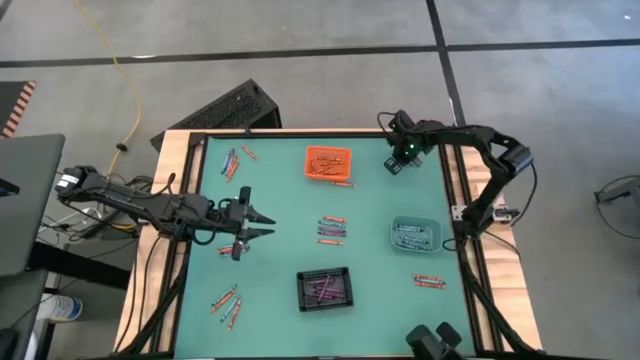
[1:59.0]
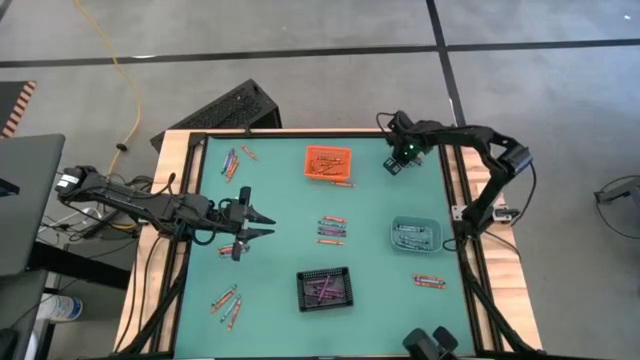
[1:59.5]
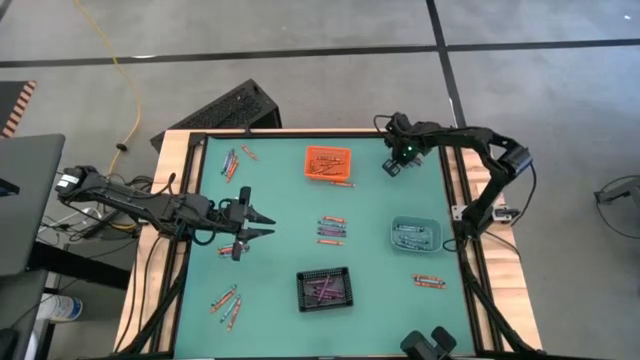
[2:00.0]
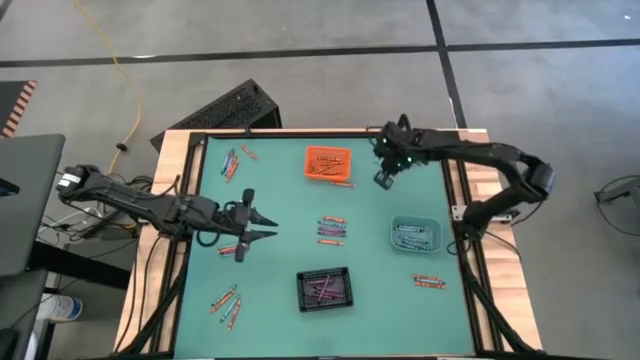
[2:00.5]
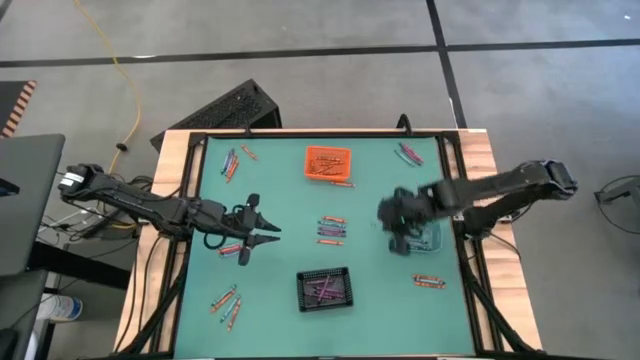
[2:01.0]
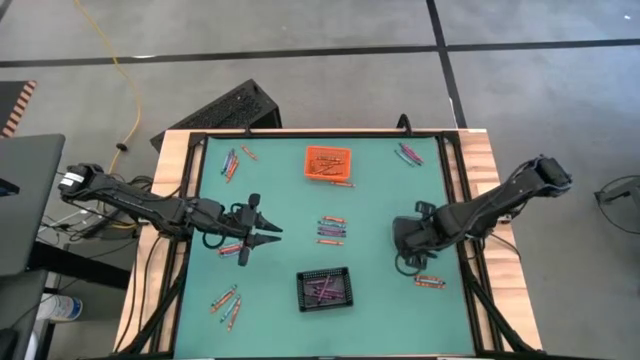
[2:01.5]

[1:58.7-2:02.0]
Task: Sort crayons
Put the blue crayon into the blue bin

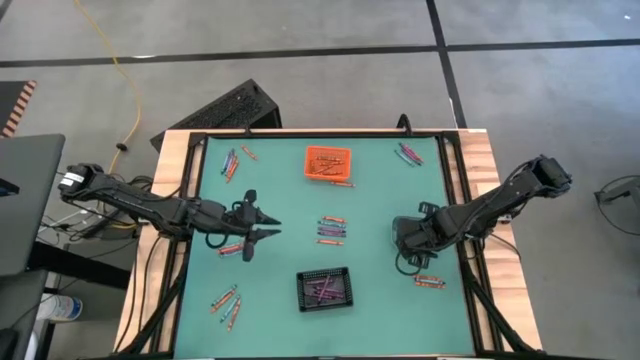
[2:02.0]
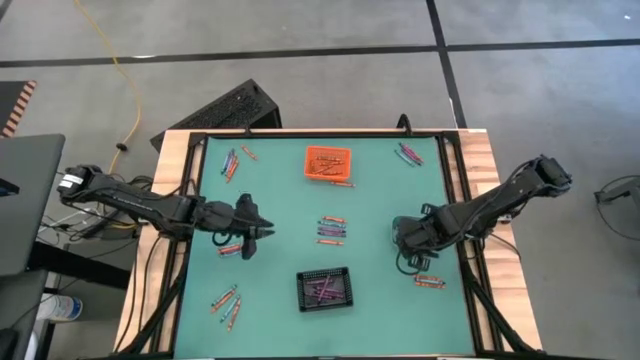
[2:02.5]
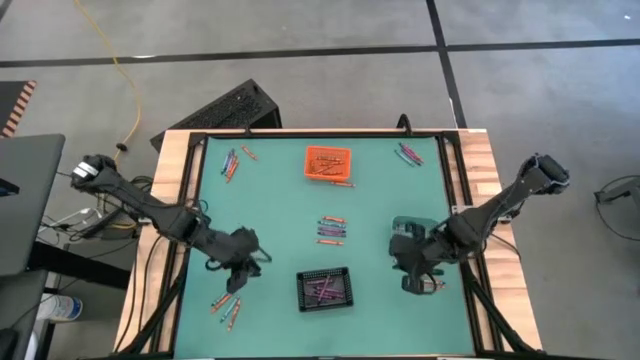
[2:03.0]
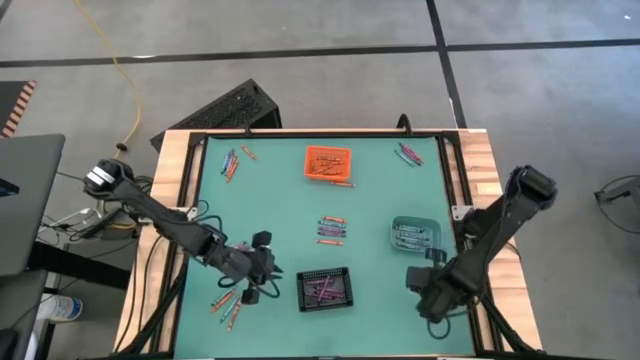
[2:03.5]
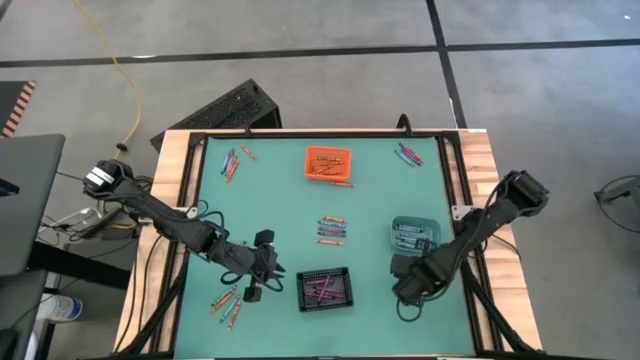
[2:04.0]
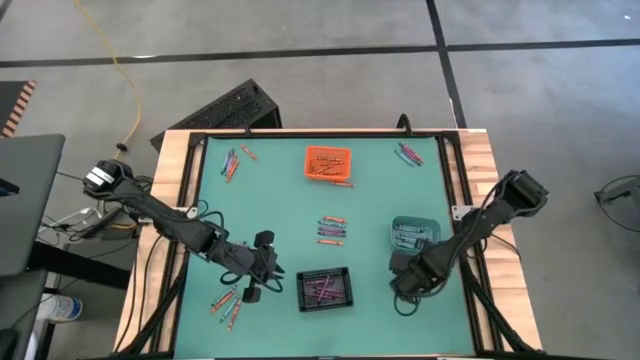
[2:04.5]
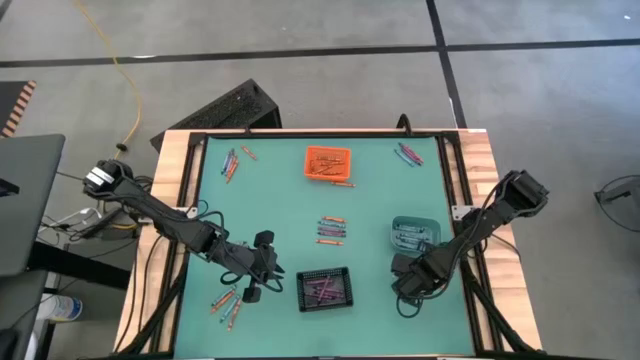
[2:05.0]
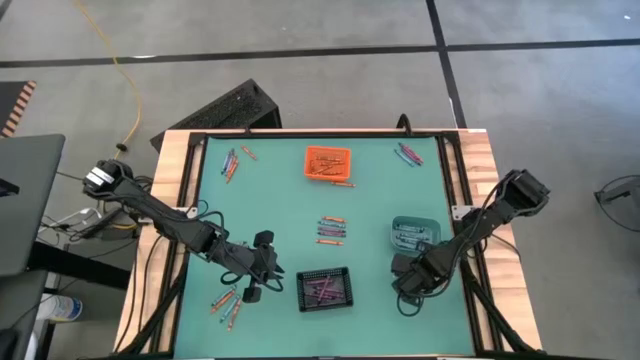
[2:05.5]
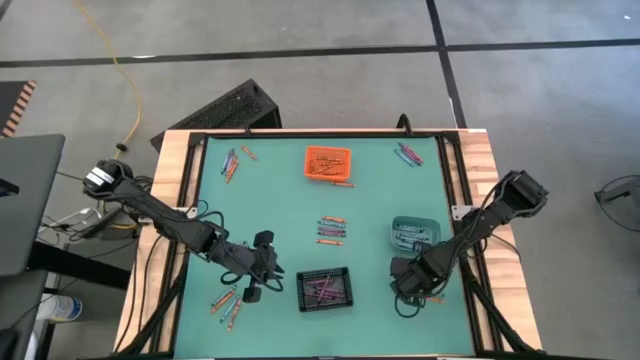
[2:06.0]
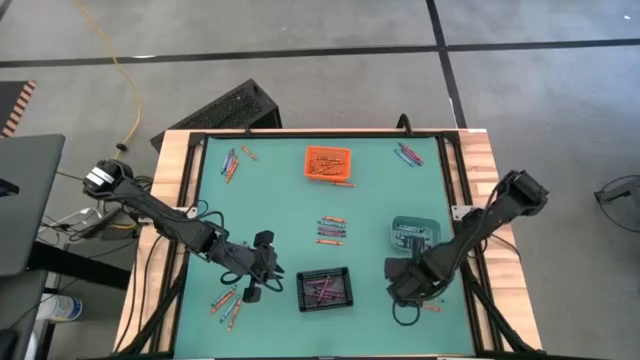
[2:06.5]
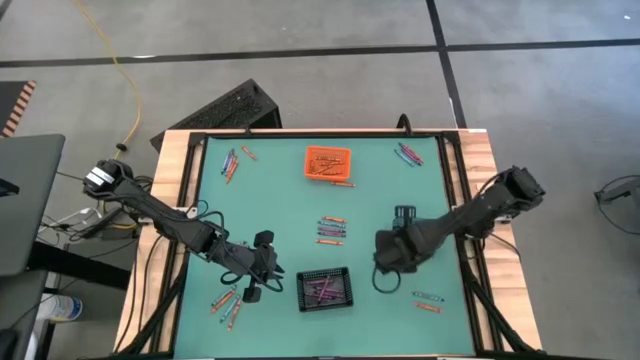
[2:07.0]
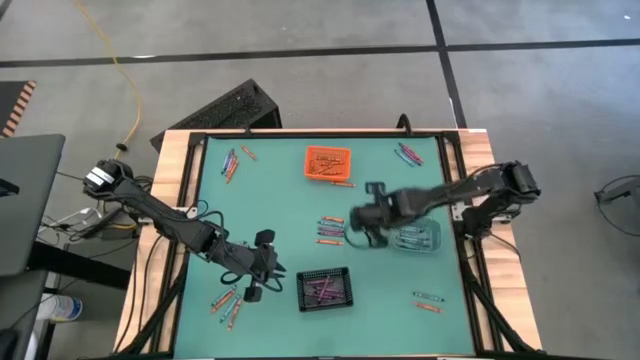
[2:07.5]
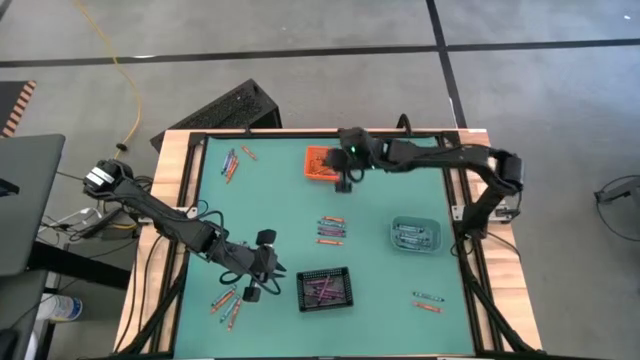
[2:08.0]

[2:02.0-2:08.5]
Put the orange crayon into the orange bin

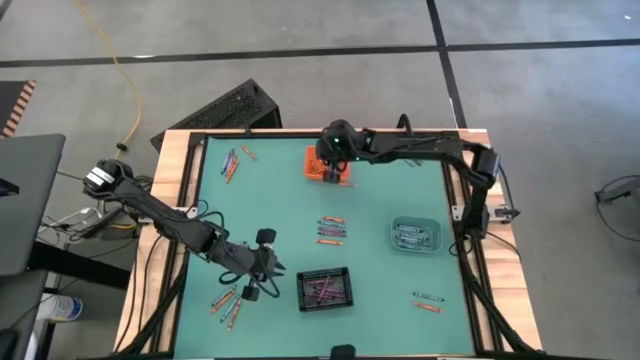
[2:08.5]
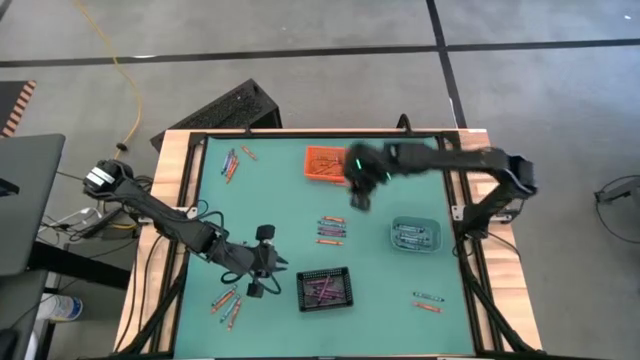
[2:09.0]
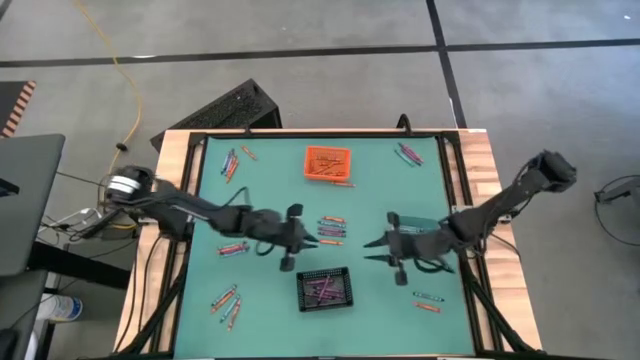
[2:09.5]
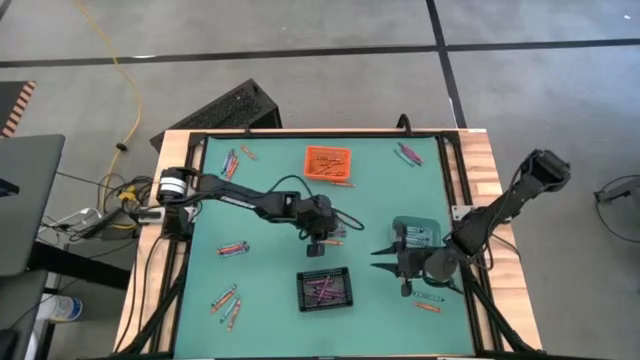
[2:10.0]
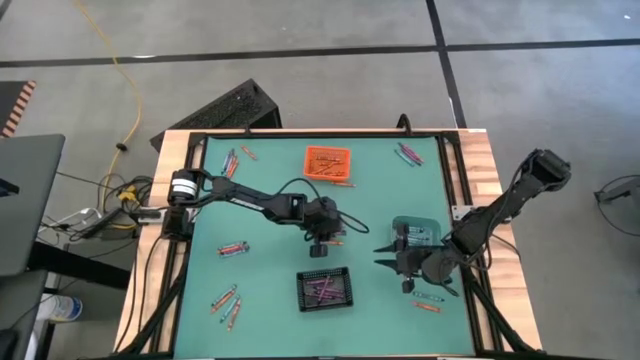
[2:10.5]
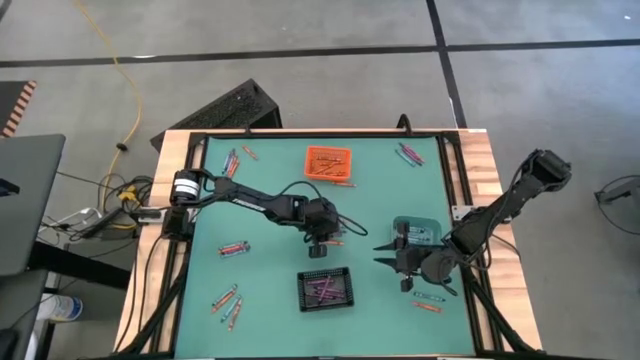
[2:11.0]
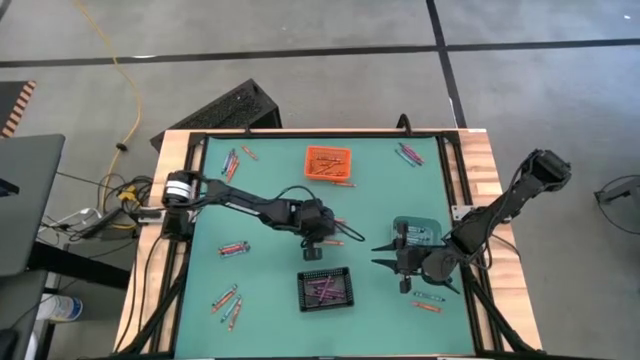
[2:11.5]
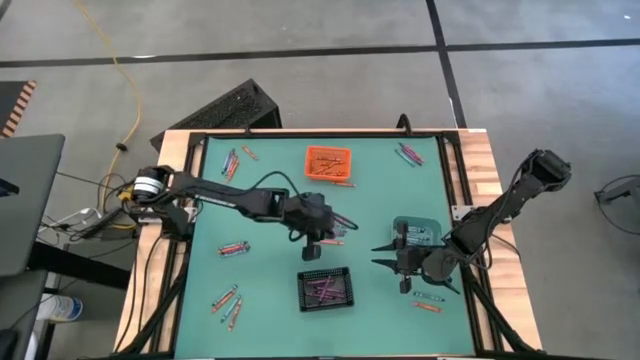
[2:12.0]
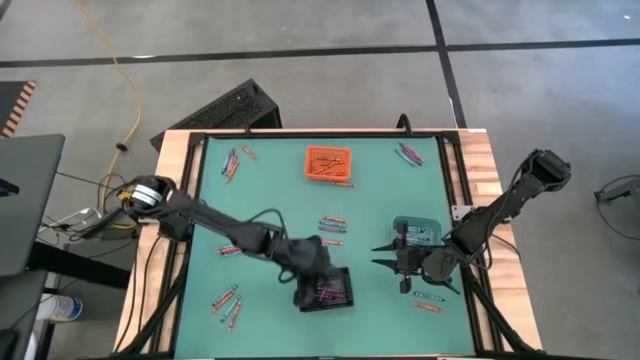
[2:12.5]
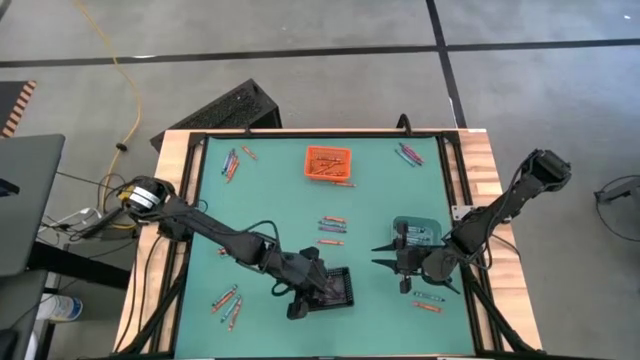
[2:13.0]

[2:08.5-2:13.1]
Put the purple crayon into the black bin

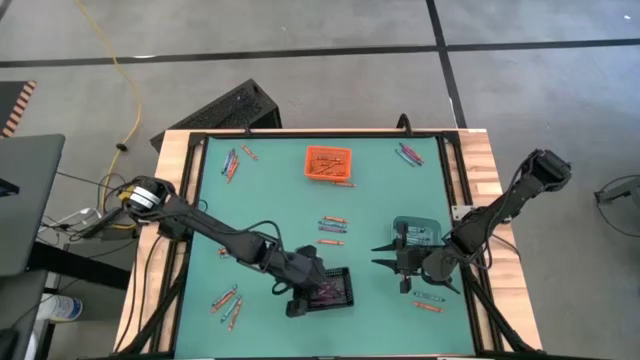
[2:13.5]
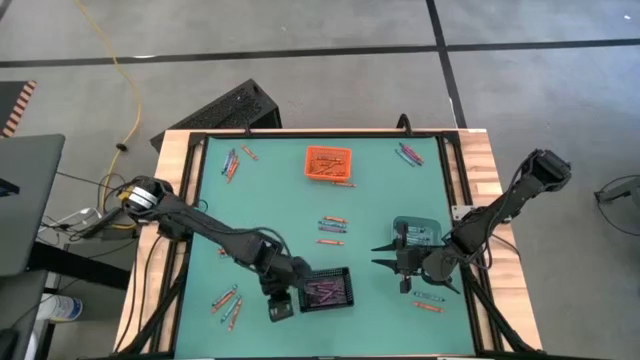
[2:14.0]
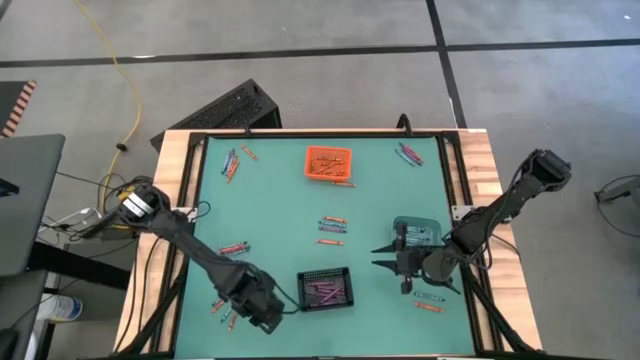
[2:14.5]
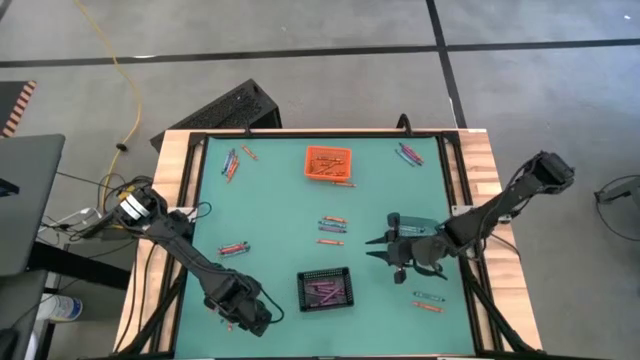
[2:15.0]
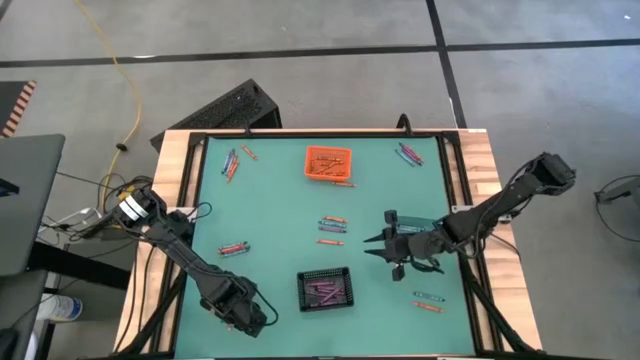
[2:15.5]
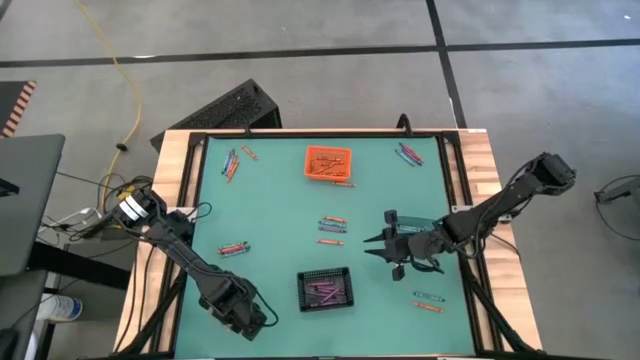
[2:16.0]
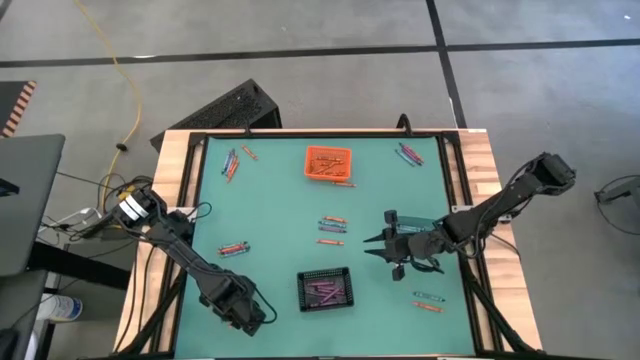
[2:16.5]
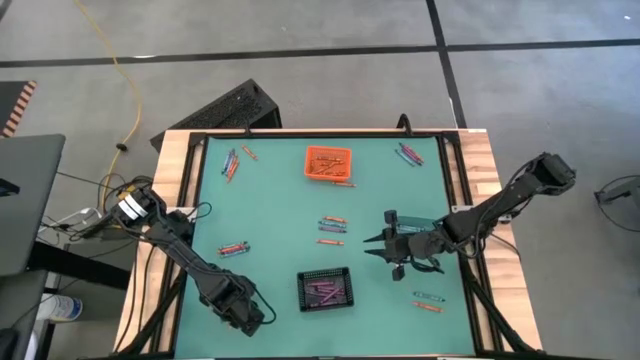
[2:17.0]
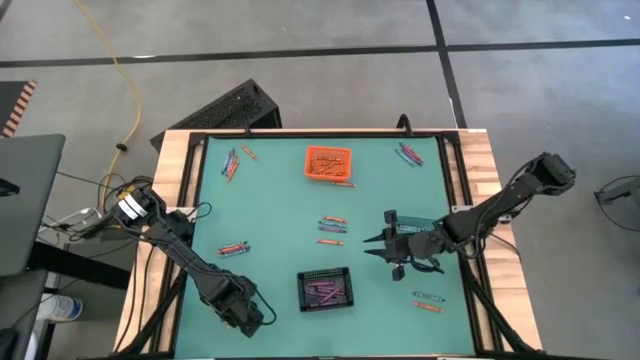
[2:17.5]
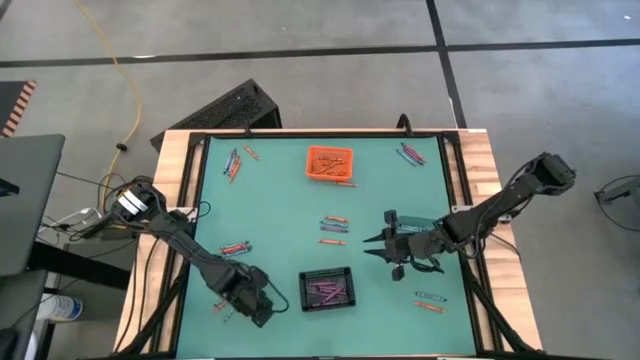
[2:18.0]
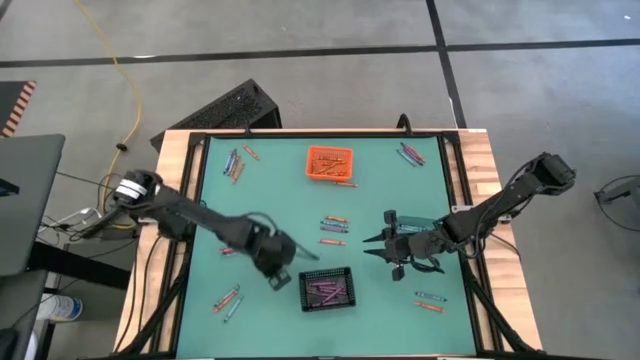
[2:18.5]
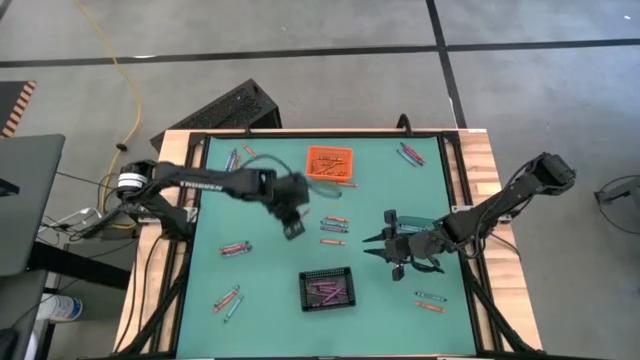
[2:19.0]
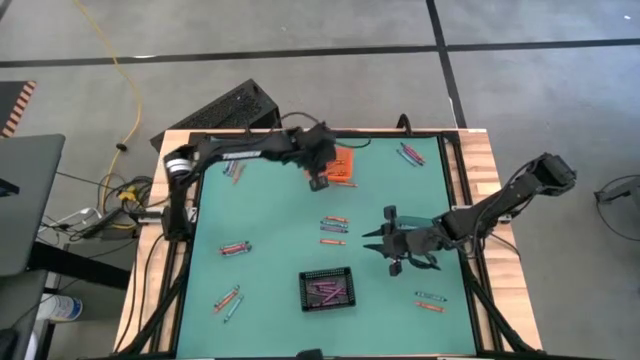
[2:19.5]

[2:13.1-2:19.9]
Put the orange crayon into the orange bin
